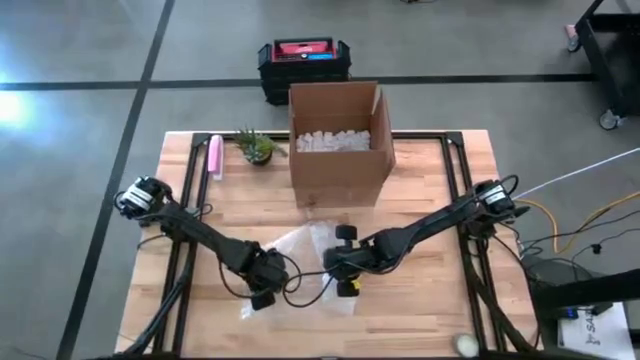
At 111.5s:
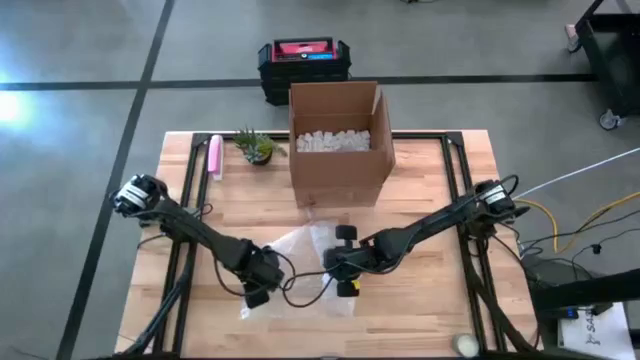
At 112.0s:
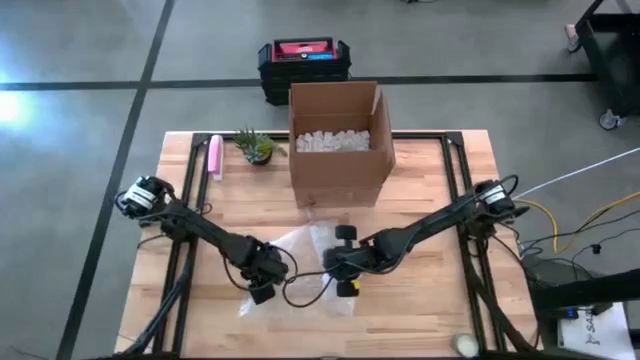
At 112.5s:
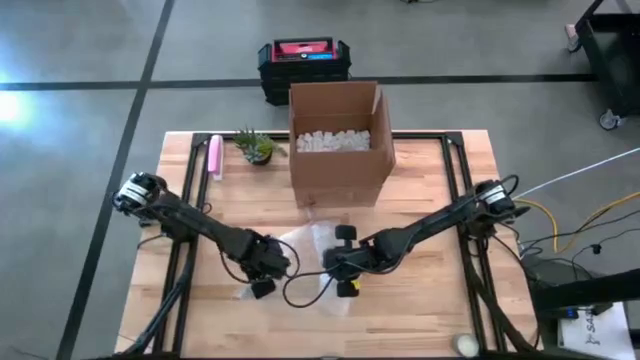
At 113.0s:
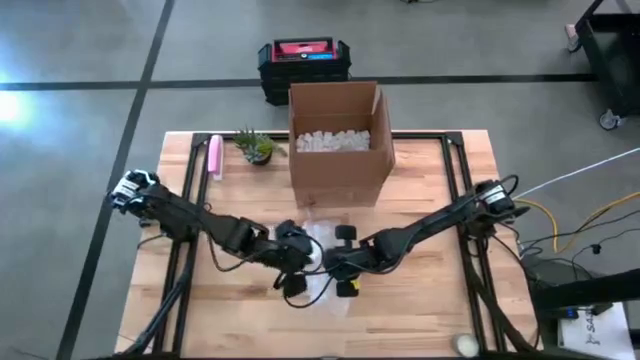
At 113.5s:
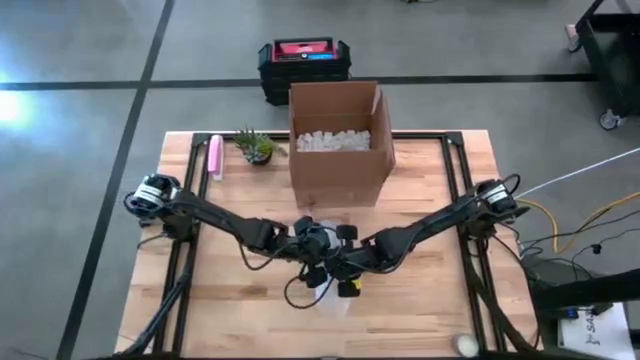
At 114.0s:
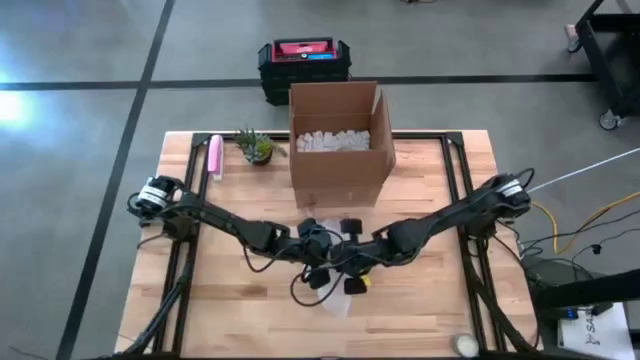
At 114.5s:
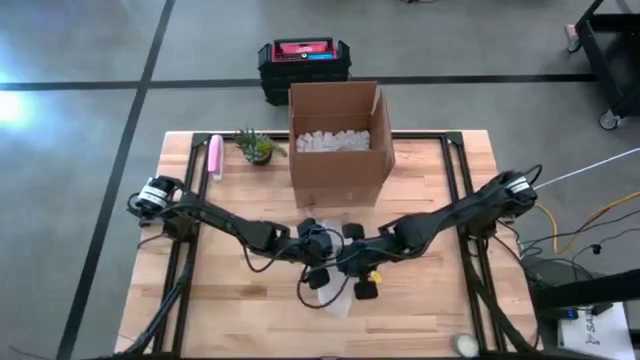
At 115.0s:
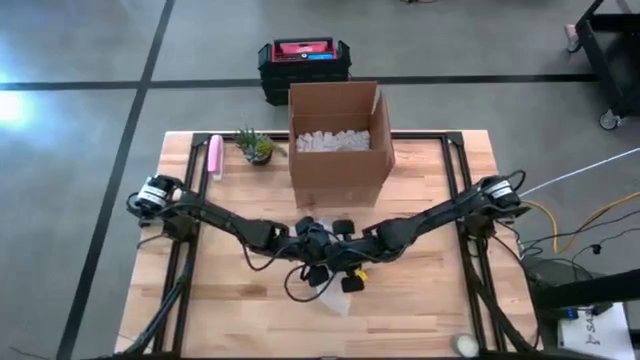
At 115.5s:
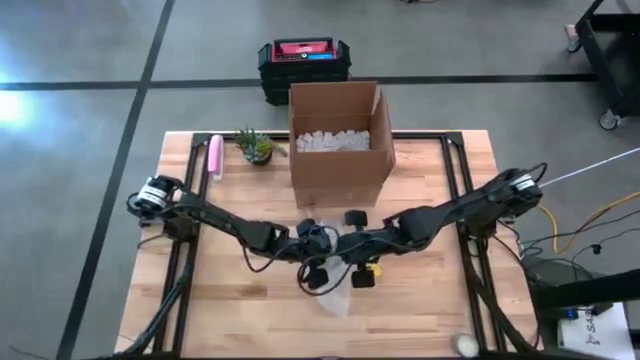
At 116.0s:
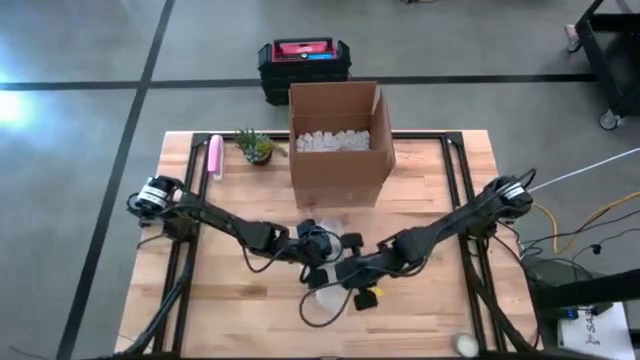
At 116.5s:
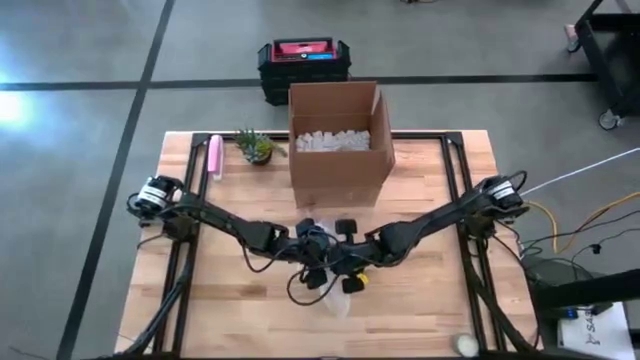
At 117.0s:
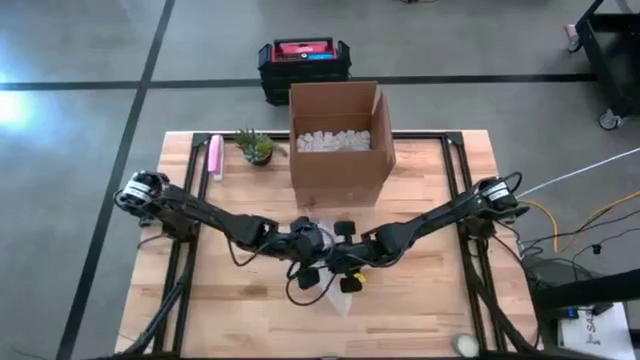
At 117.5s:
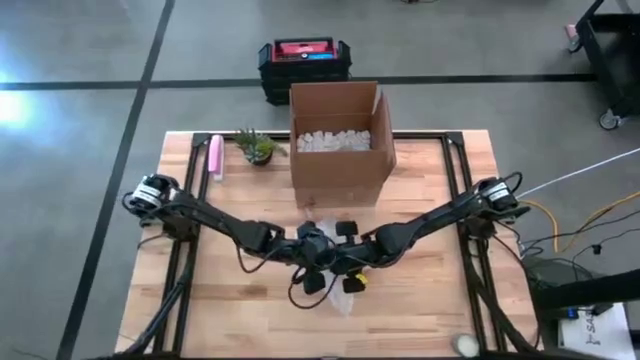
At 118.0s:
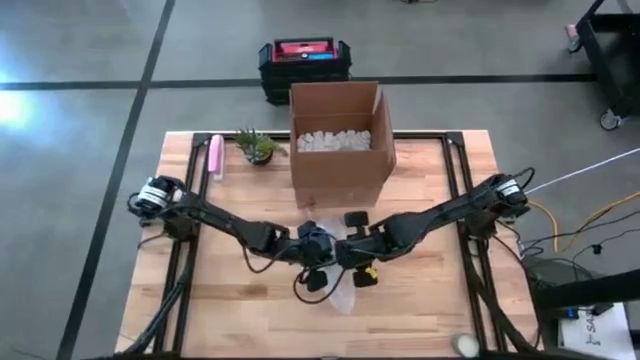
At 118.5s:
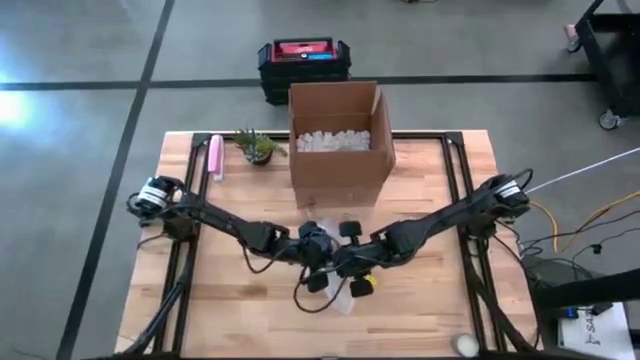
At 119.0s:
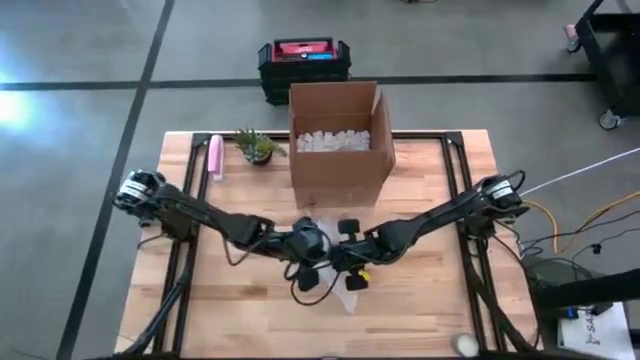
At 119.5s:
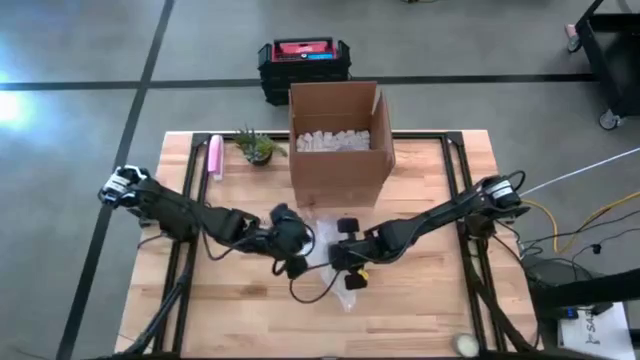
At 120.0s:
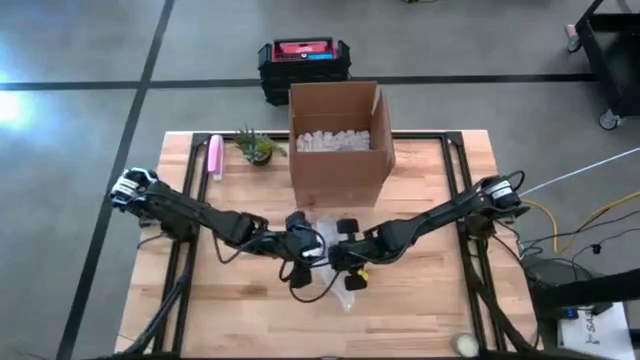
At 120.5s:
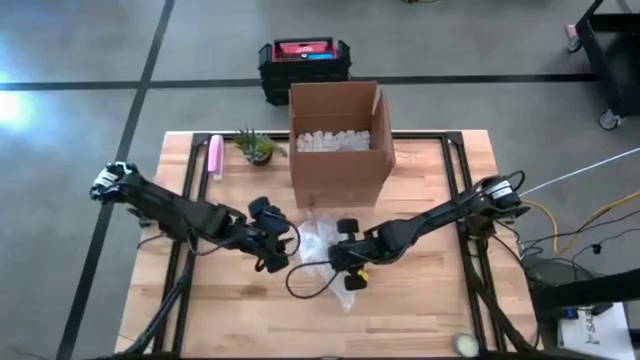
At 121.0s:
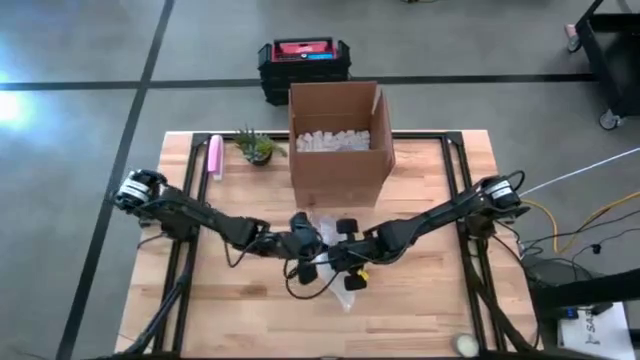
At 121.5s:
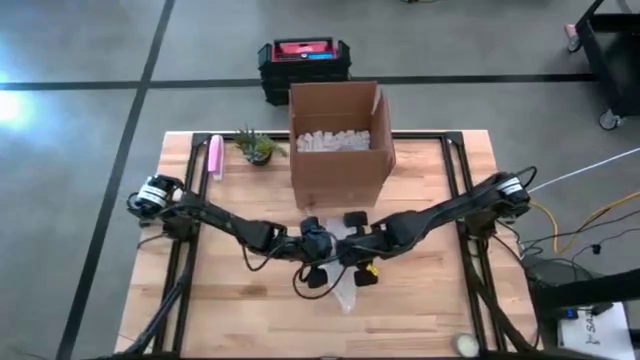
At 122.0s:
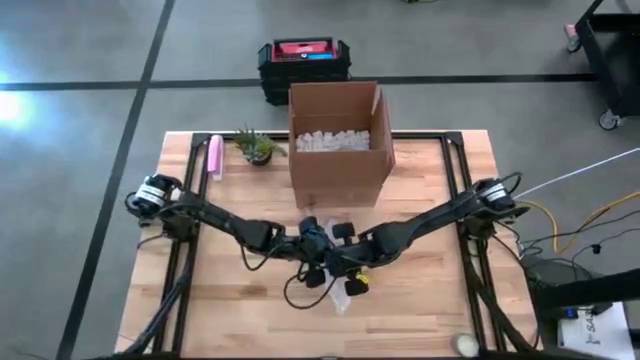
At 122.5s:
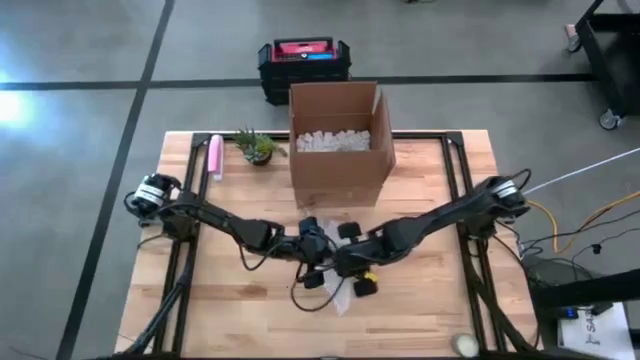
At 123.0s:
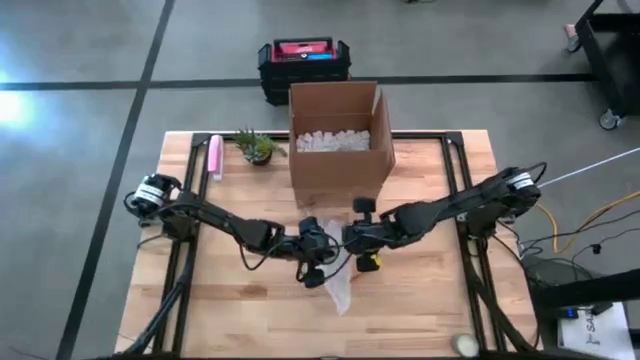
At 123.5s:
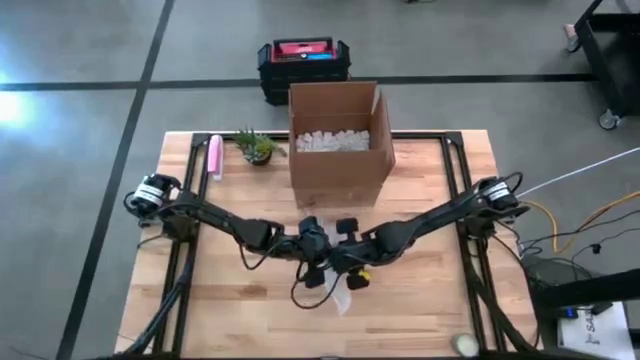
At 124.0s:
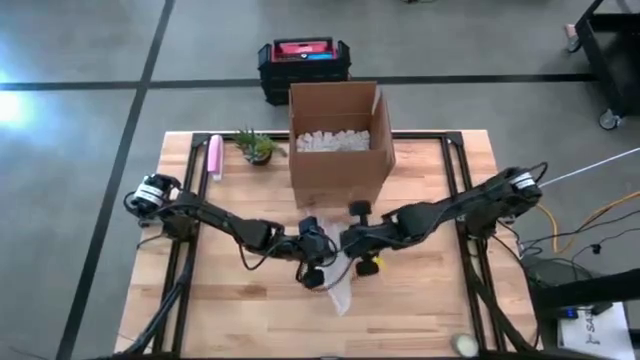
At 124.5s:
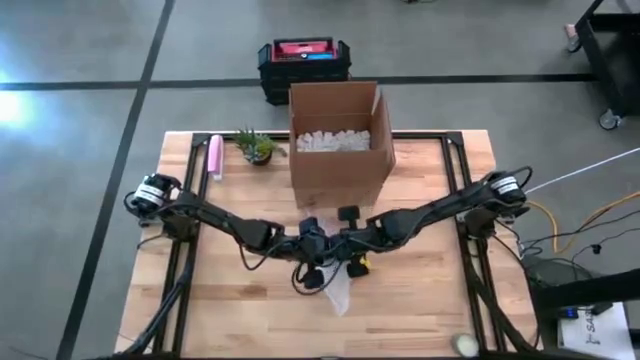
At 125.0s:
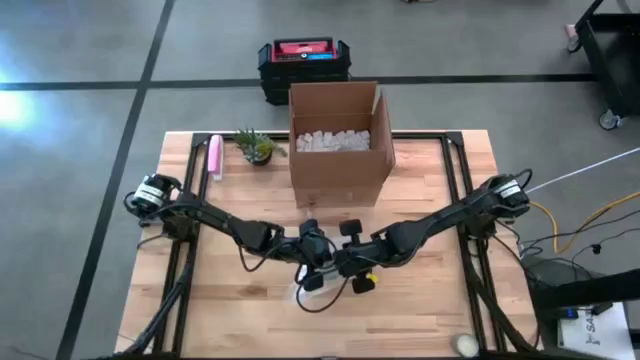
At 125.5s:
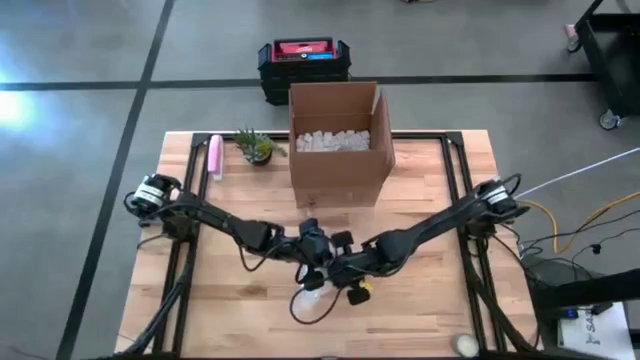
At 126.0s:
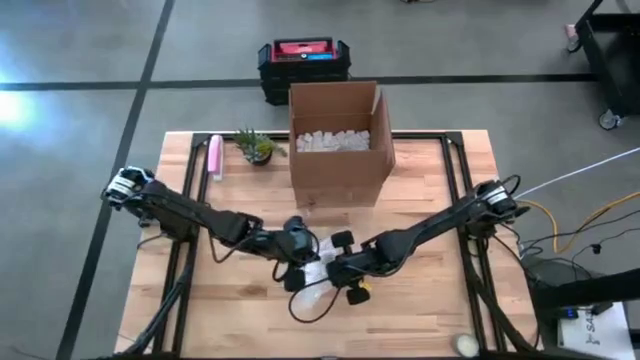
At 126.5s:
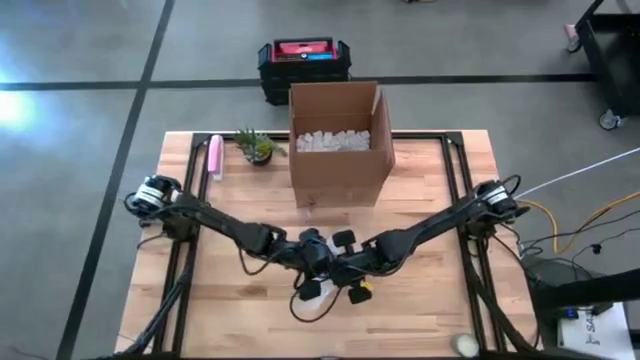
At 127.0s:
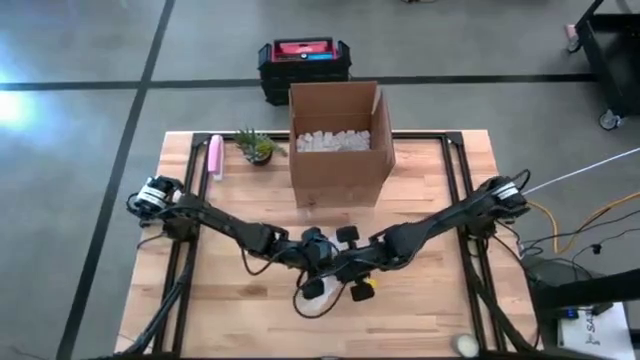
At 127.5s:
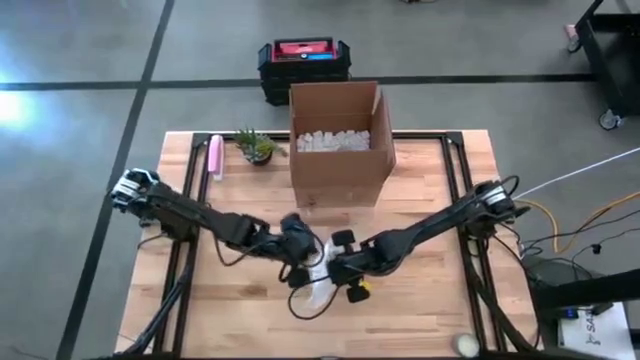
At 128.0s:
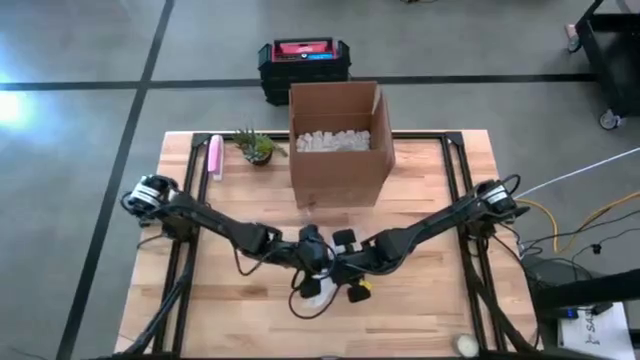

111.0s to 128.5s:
Task: wrap mug
Wrap the orange patterned mug using the bubble wrap

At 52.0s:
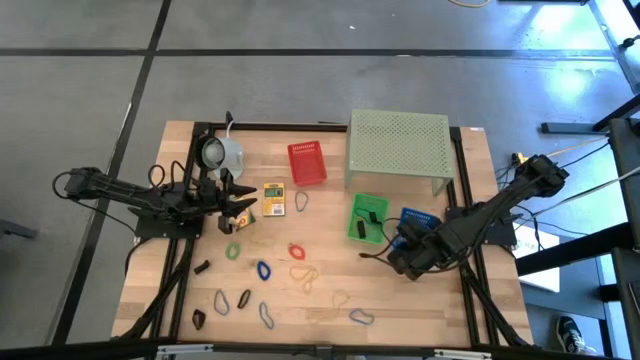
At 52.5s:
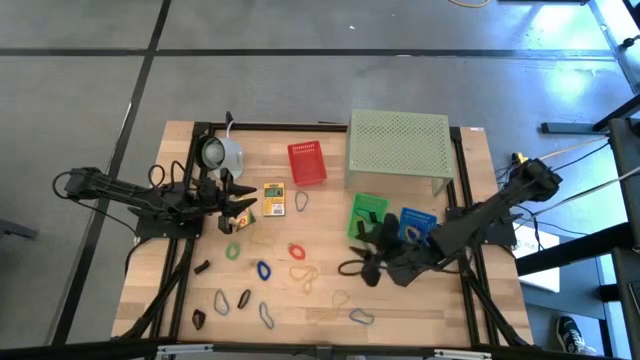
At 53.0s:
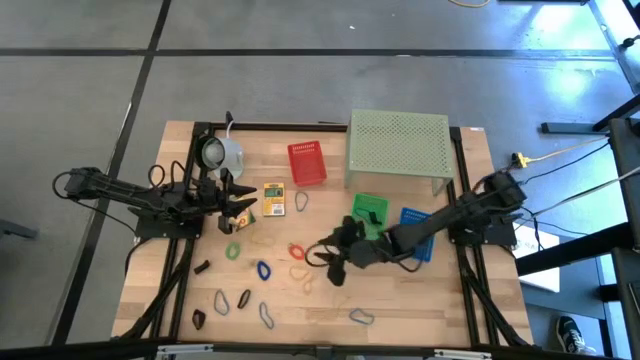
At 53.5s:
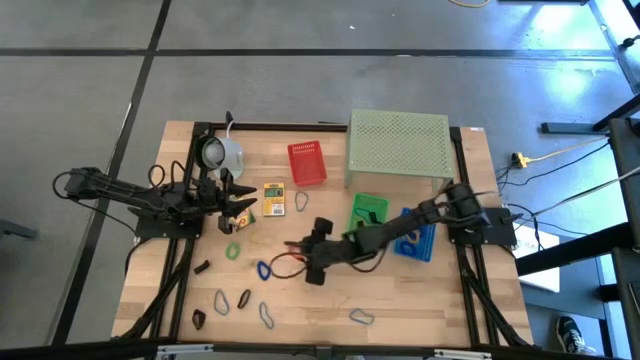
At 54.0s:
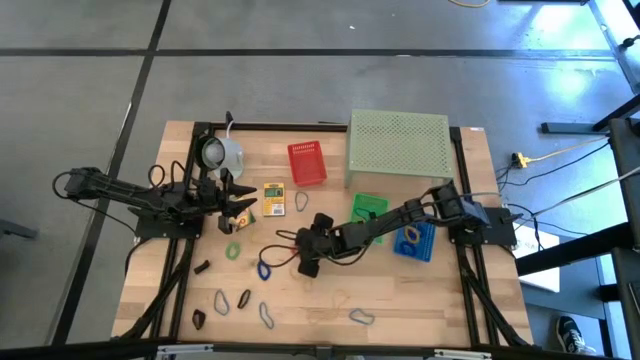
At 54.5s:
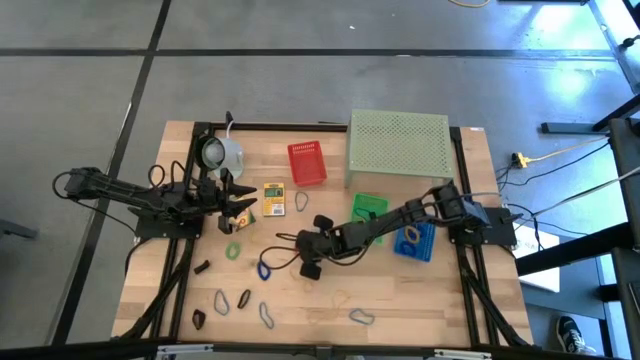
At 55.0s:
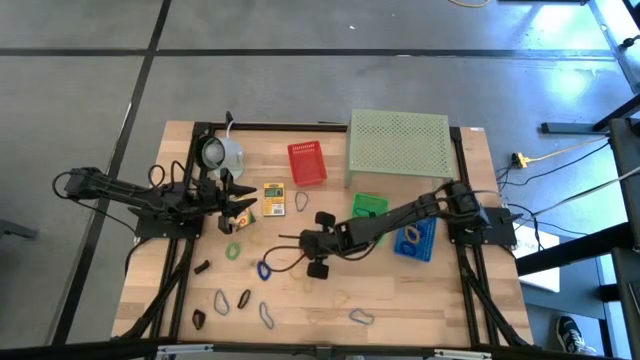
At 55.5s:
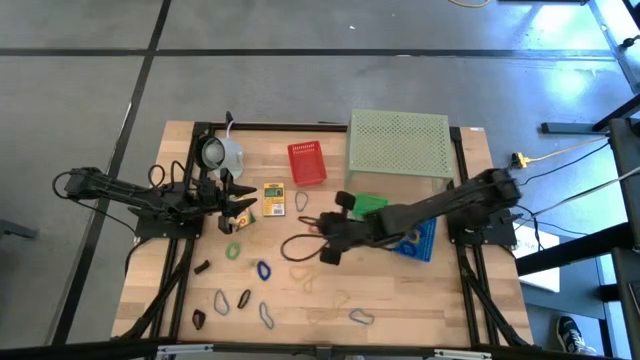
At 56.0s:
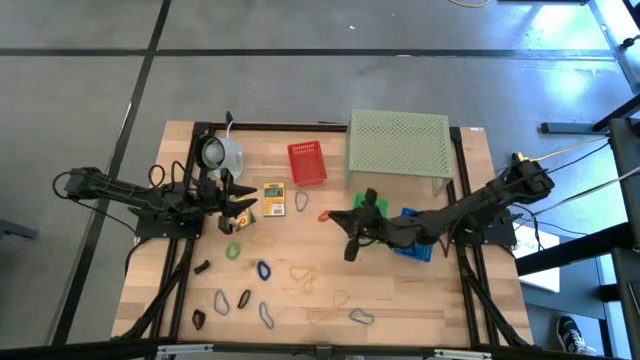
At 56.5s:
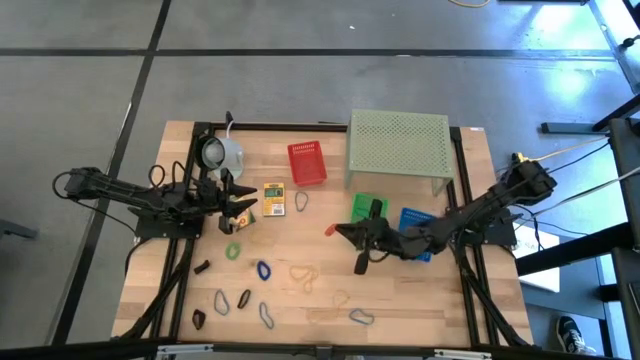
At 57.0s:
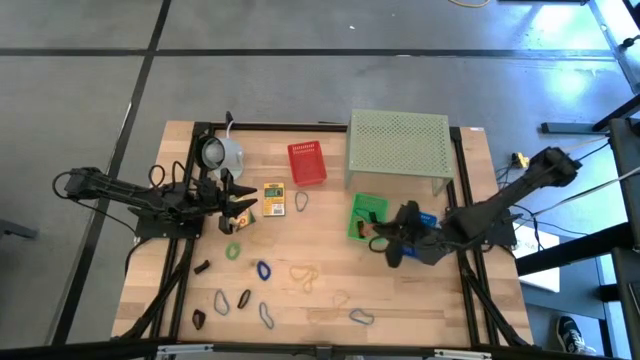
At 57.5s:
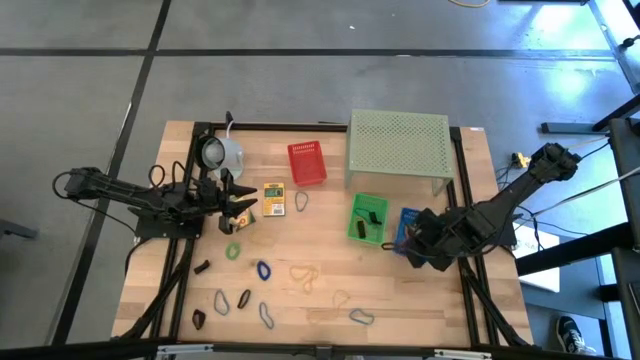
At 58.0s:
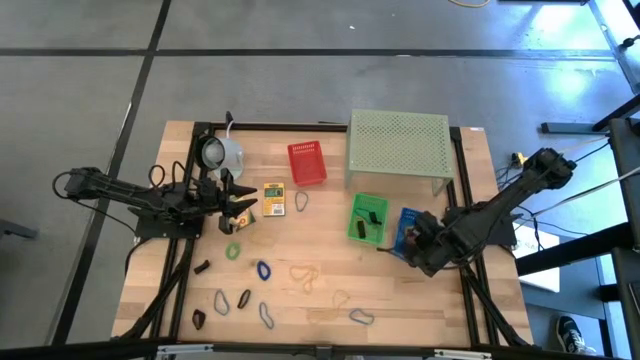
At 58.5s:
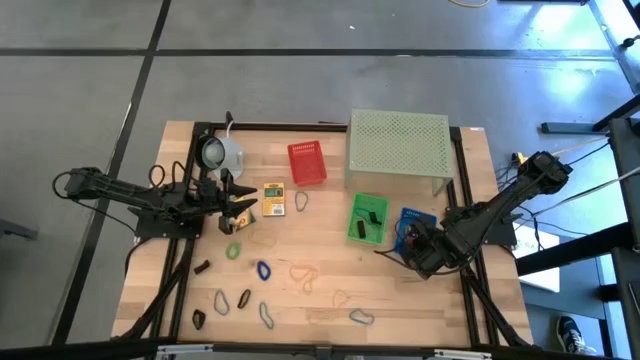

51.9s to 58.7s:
Task: Pick & Place Office Desk Supplies
Put the orange spring keychain into the blue bin
